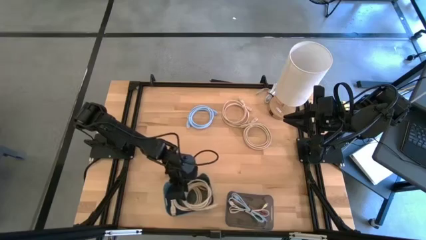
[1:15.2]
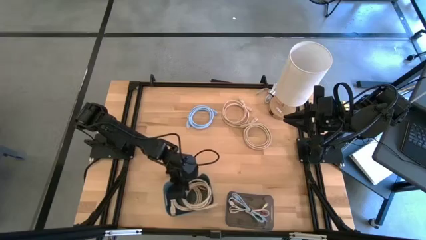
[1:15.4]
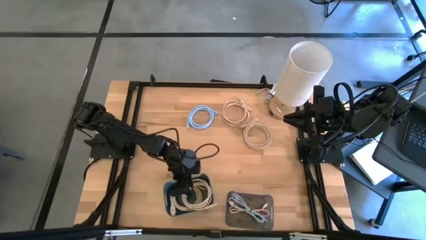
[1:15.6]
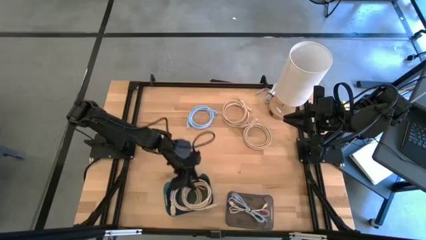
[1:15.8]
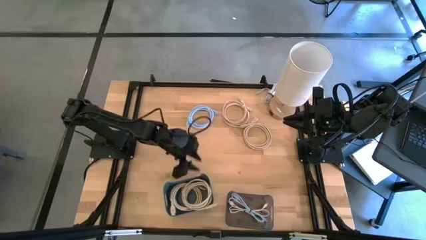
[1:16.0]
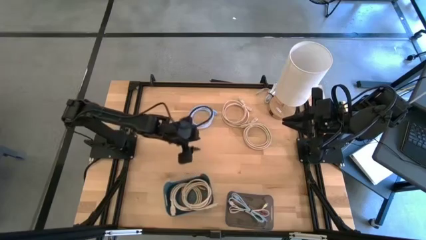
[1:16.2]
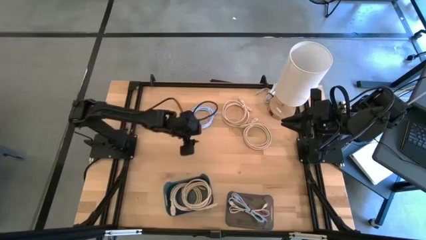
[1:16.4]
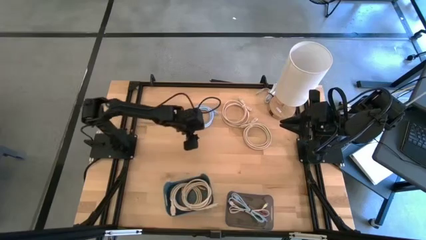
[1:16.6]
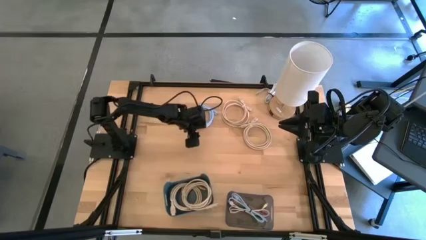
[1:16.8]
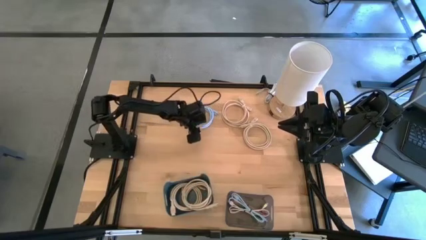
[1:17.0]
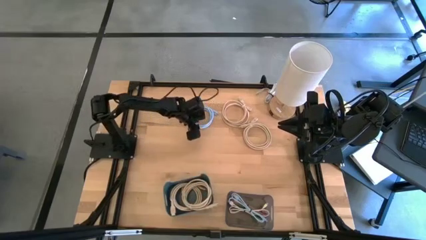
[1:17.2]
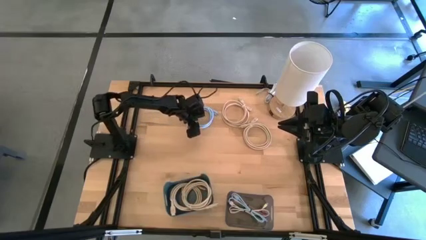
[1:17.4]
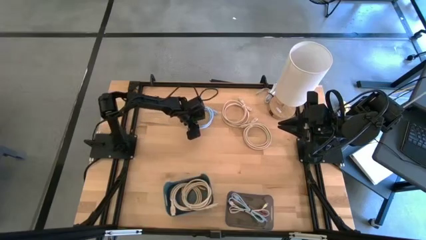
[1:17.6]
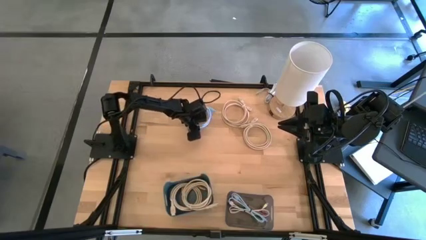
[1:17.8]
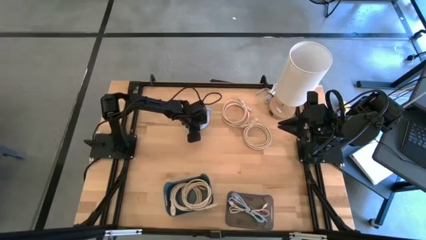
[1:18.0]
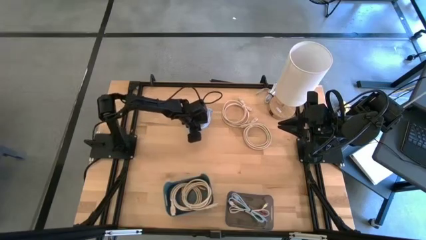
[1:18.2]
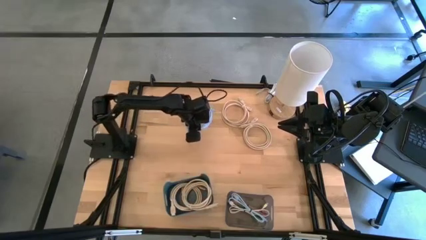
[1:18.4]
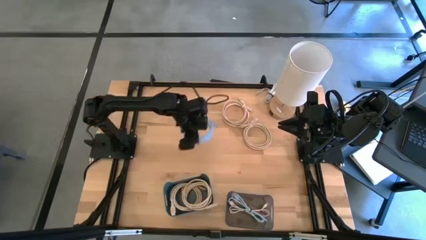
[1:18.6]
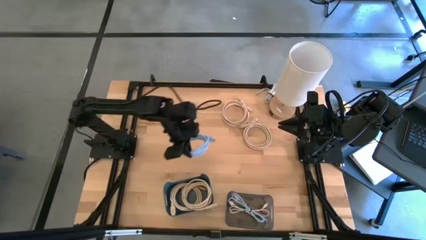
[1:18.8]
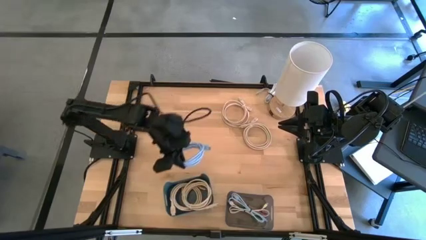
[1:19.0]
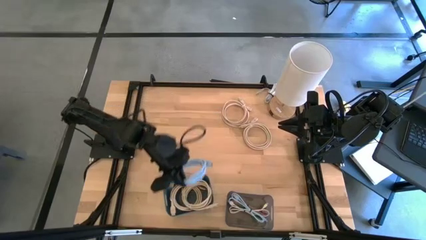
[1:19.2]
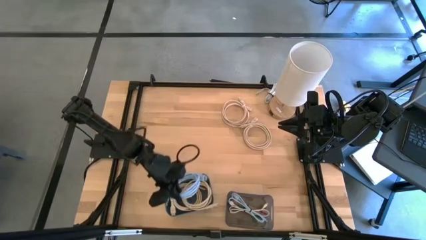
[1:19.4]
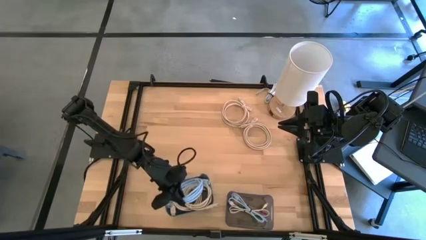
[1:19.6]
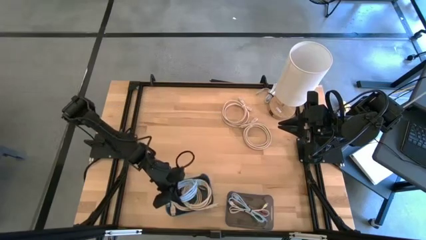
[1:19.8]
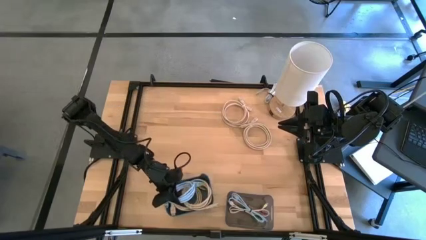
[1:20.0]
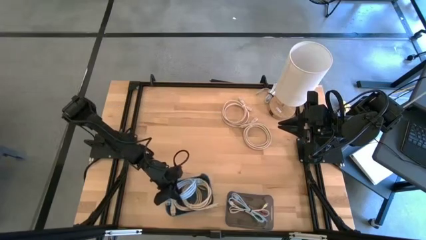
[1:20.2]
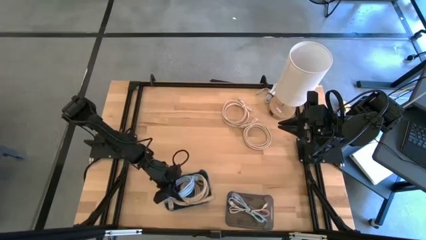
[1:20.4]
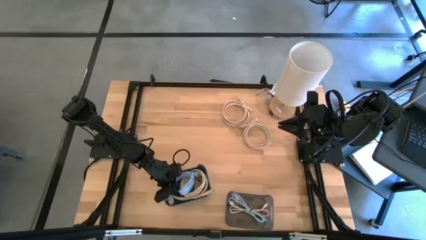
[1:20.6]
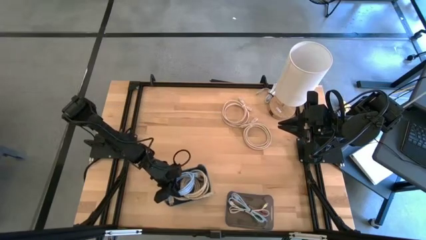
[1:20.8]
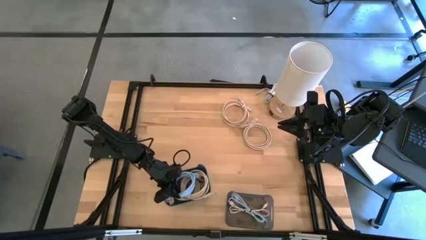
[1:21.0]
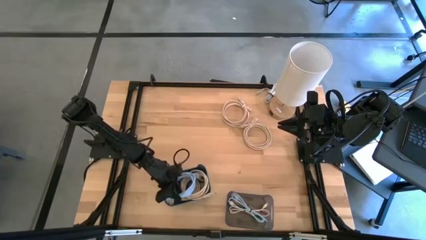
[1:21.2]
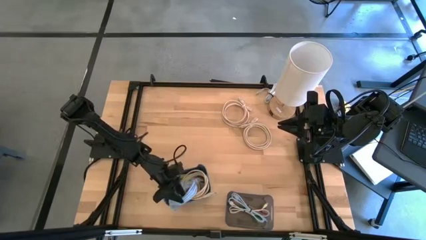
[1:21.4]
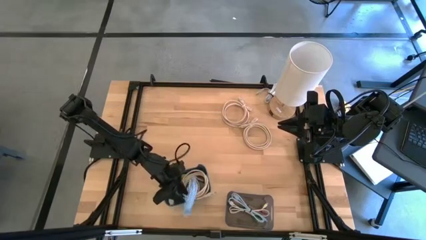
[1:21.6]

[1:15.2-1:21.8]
Put the blue HDMI cable into the blue bin

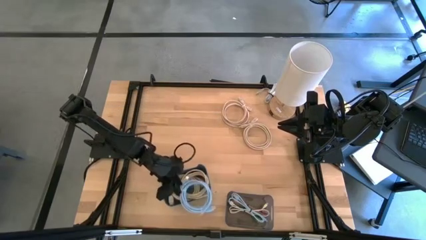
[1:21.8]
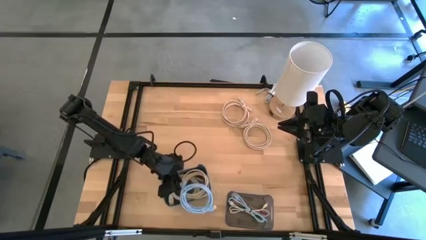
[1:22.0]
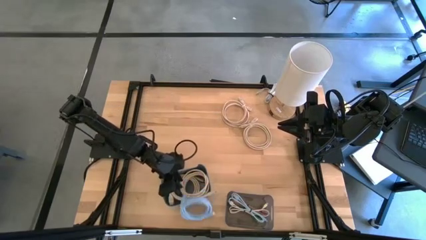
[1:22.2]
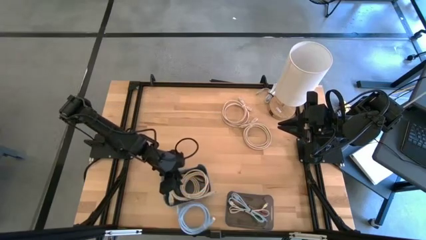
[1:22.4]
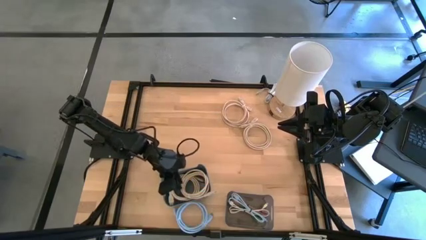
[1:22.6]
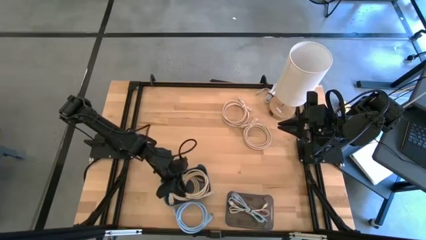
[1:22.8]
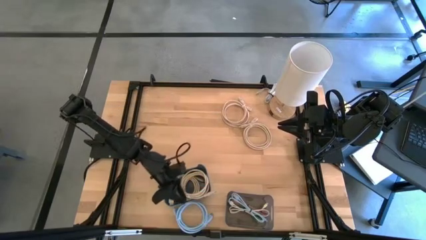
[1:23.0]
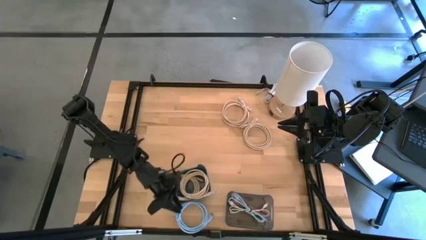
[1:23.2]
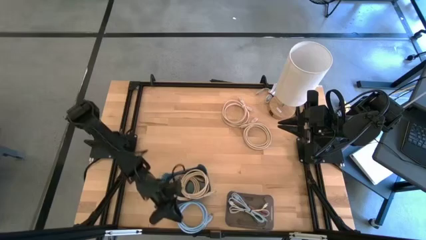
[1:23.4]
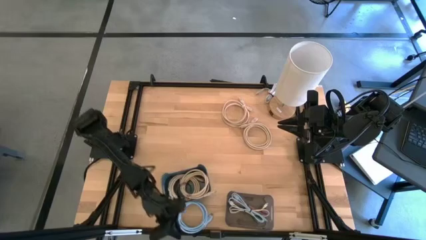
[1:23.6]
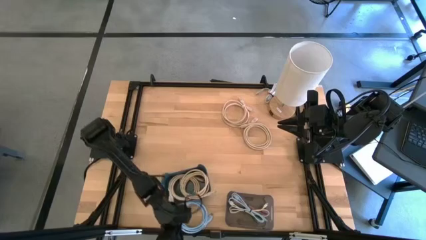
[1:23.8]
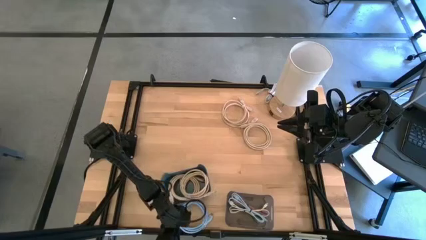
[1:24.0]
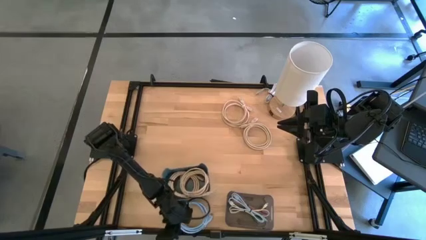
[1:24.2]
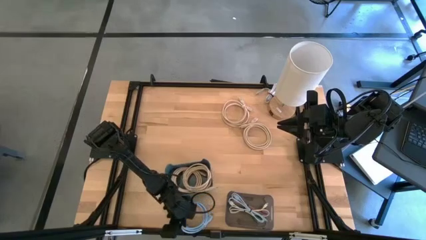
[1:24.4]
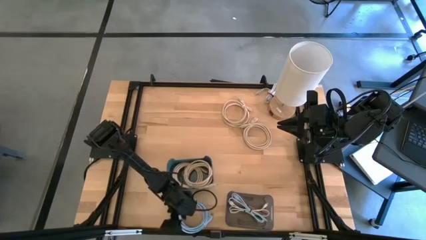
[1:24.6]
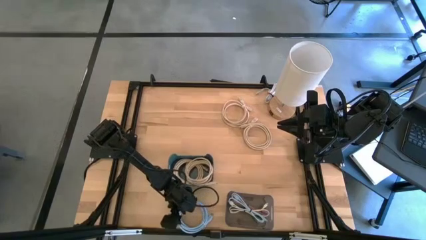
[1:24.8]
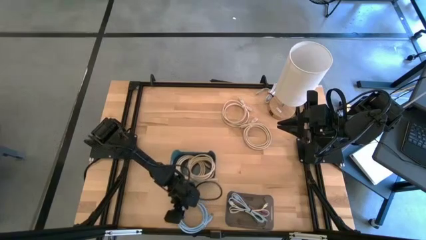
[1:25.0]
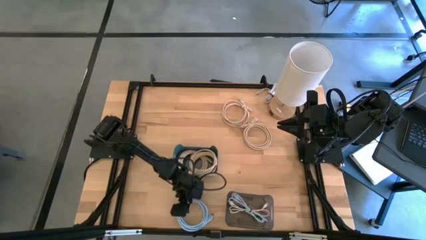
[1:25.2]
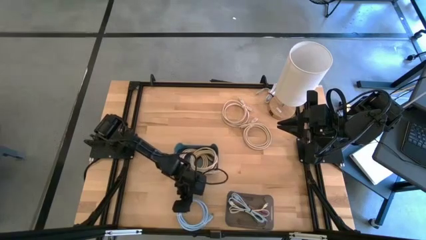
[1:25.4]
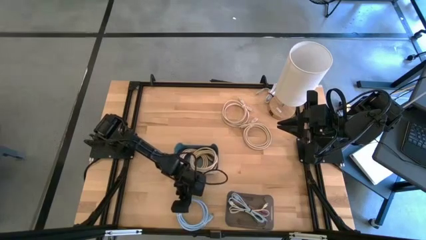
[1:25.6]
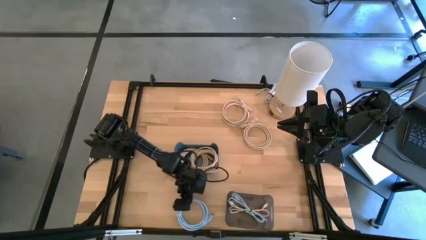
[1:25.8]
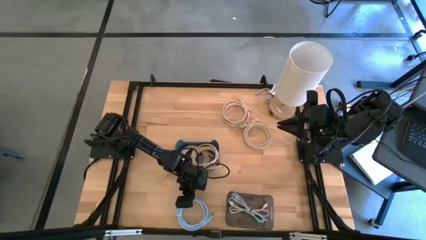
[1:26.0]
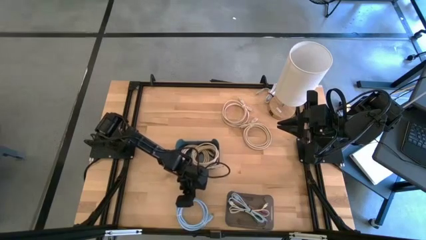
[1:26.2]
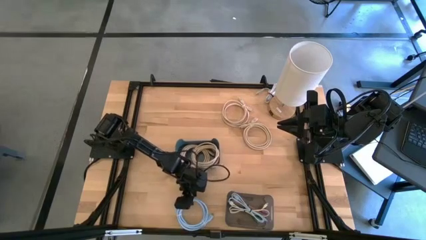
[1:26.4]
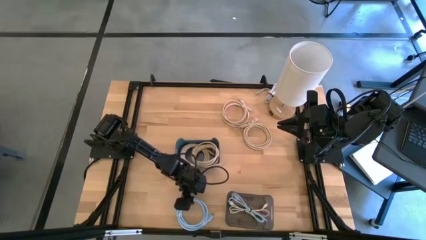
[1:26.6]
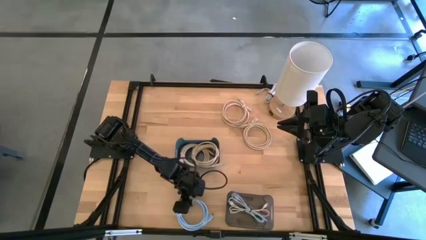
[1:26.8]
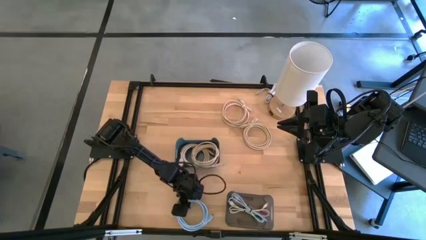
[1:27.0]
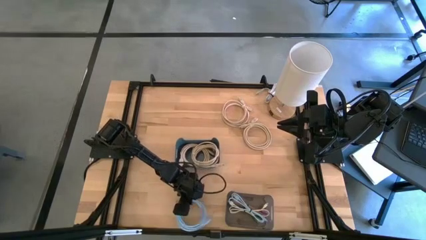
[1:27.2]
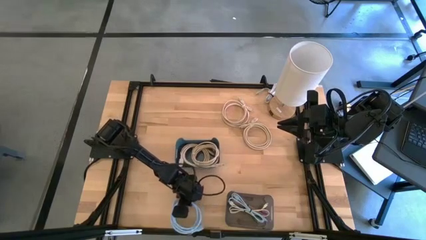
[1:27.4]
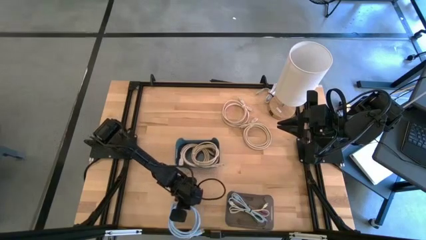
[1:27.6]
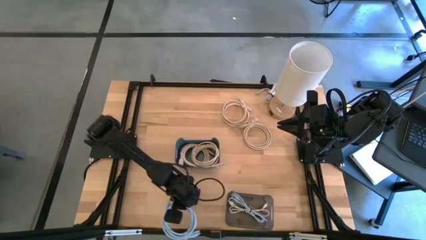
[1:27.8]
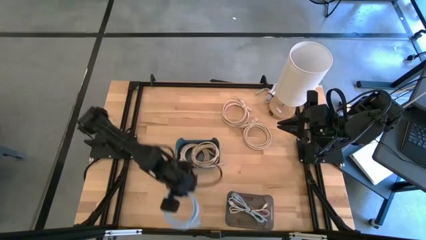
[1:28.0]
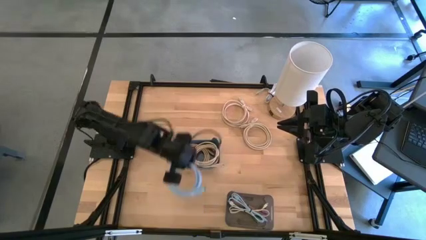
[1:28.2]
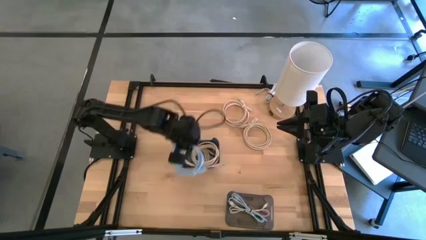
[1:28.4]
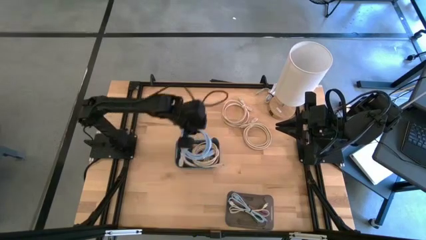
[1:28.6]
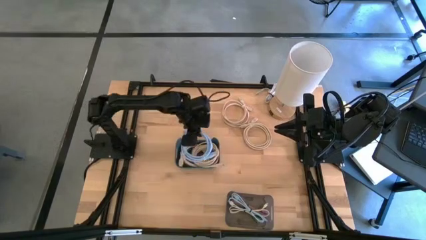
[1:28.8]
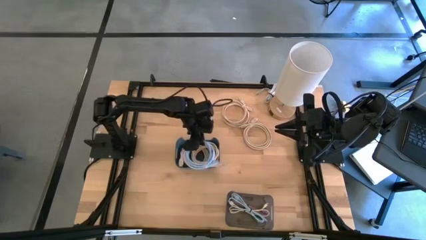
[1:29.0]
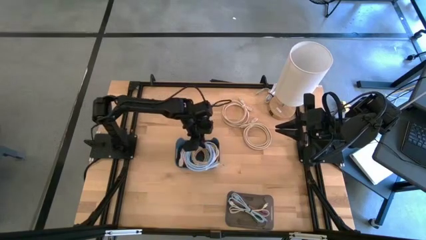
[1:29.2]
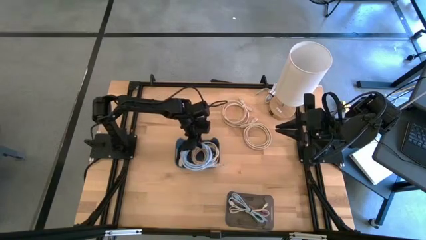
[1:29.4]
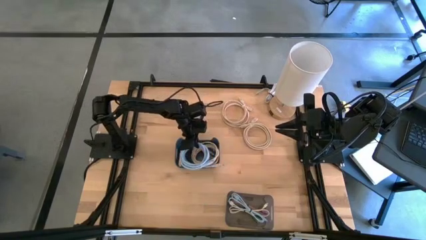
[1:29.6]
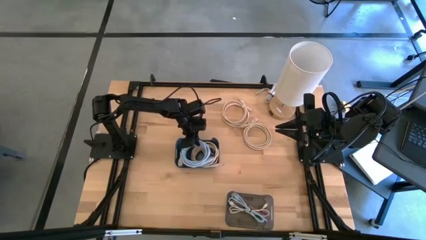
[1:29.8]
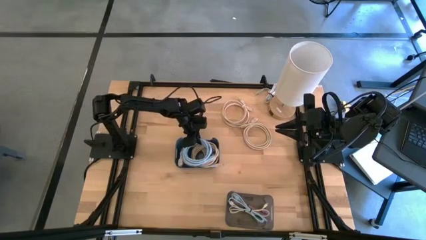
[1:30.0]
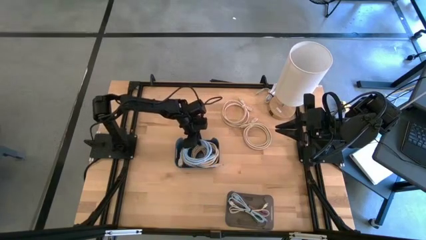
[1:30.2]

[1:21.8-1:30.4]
Put the blue HDMI cable into the blue bin
